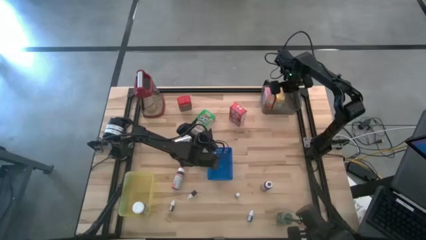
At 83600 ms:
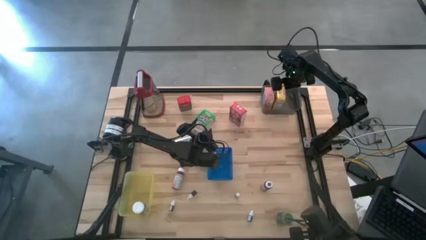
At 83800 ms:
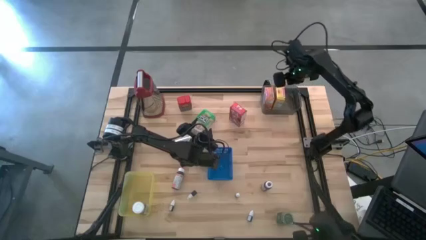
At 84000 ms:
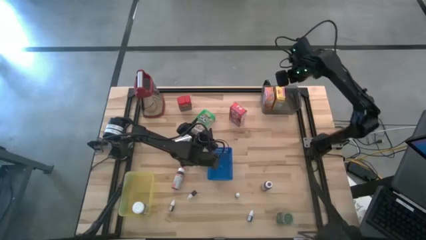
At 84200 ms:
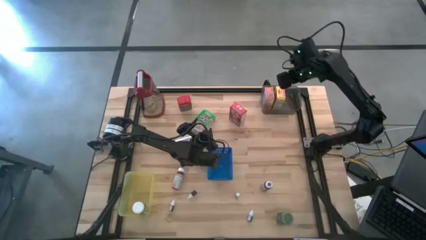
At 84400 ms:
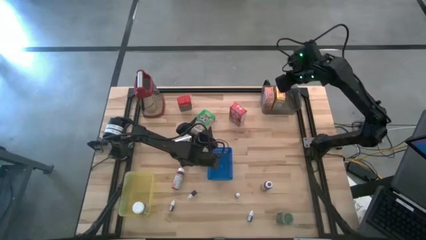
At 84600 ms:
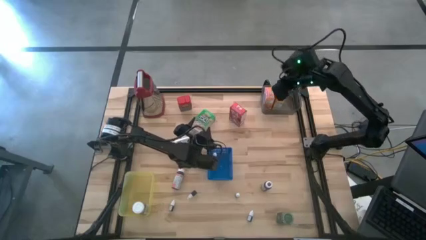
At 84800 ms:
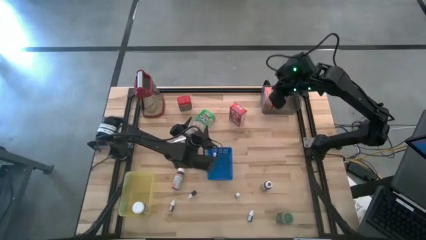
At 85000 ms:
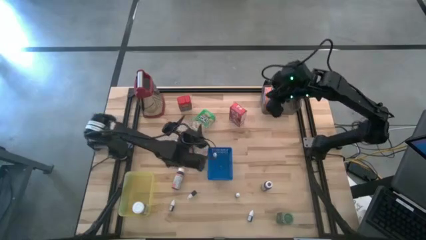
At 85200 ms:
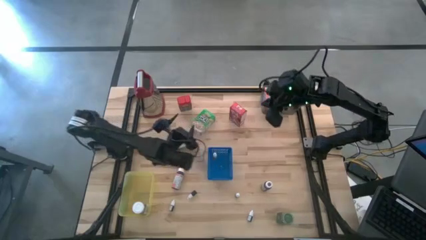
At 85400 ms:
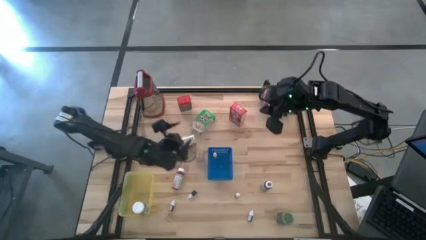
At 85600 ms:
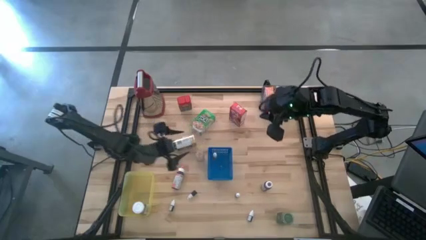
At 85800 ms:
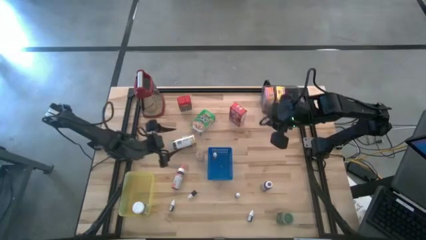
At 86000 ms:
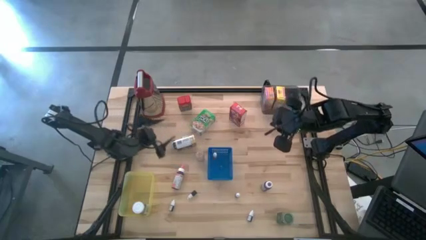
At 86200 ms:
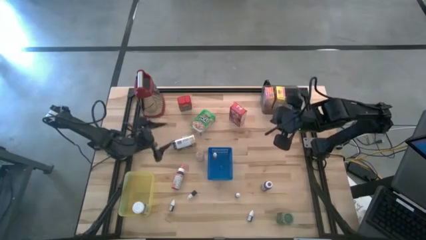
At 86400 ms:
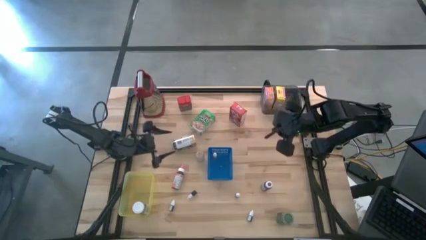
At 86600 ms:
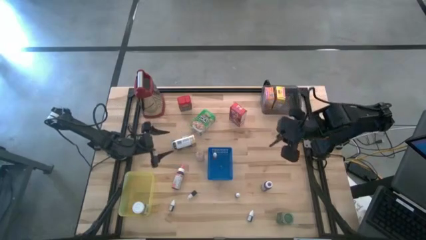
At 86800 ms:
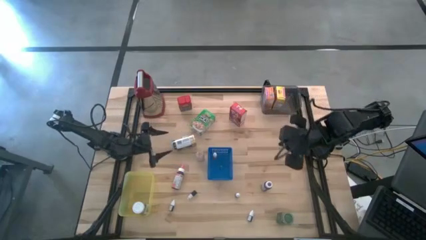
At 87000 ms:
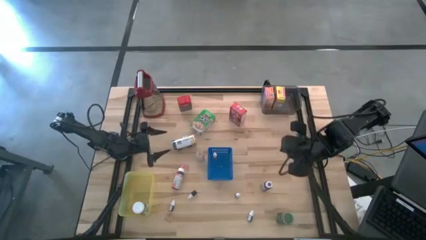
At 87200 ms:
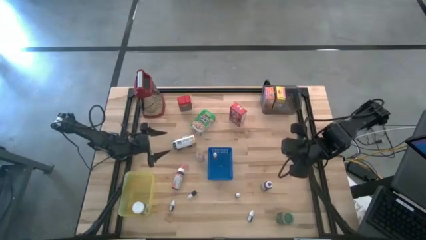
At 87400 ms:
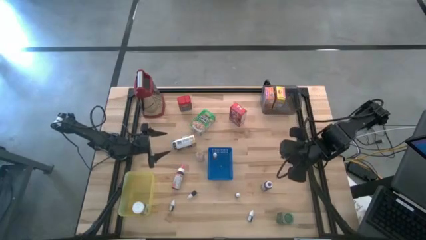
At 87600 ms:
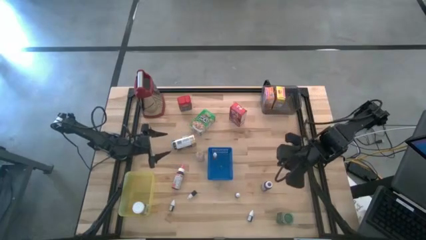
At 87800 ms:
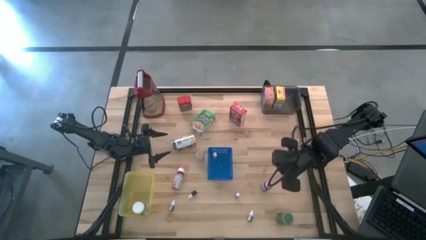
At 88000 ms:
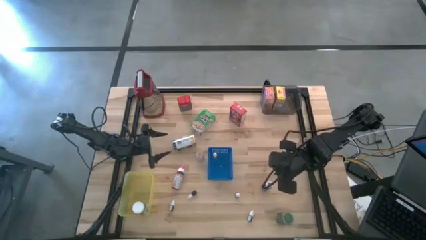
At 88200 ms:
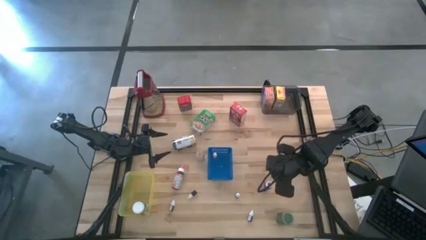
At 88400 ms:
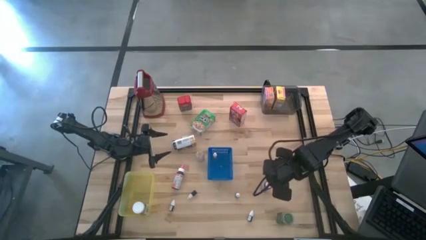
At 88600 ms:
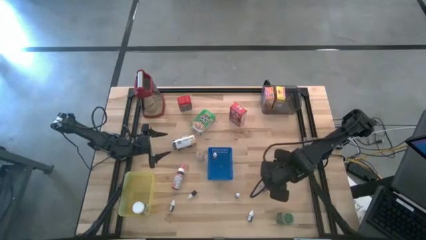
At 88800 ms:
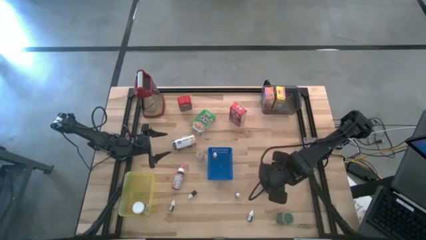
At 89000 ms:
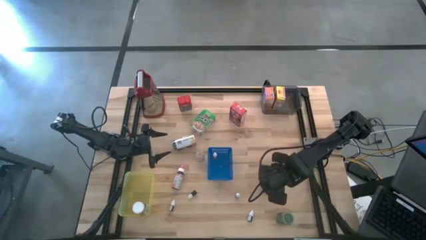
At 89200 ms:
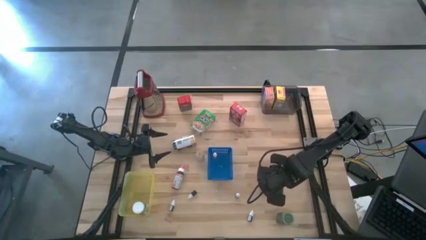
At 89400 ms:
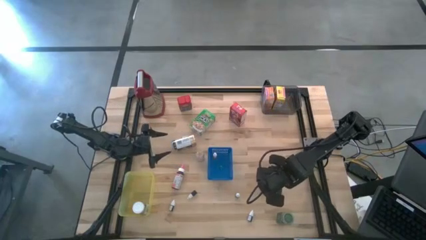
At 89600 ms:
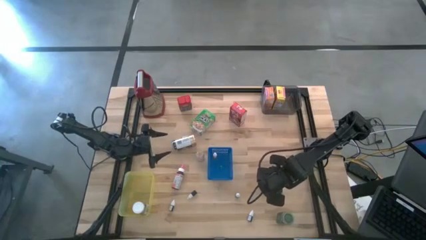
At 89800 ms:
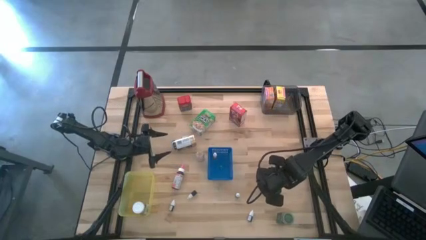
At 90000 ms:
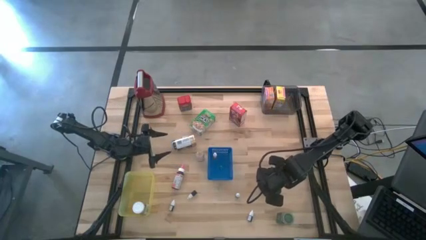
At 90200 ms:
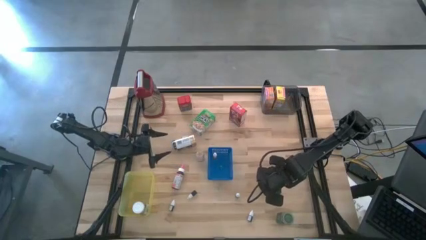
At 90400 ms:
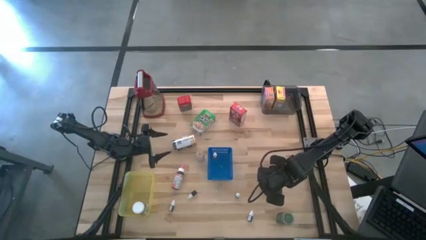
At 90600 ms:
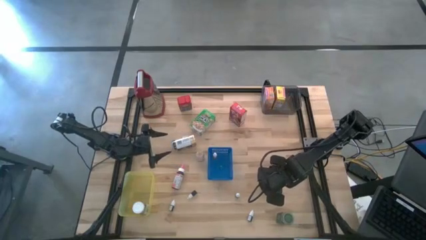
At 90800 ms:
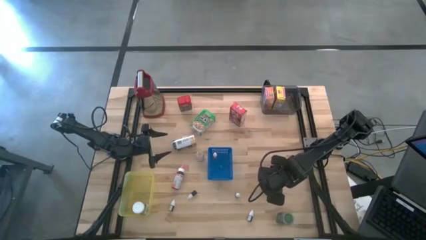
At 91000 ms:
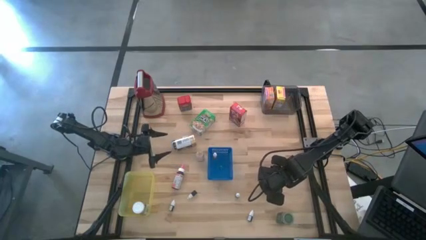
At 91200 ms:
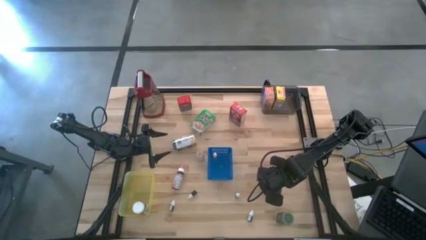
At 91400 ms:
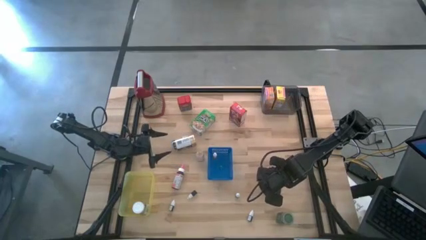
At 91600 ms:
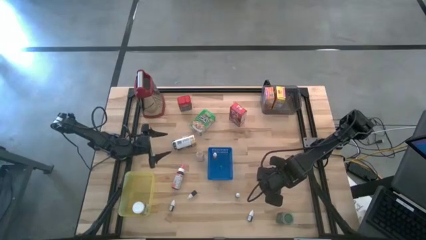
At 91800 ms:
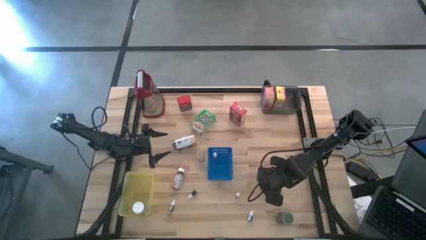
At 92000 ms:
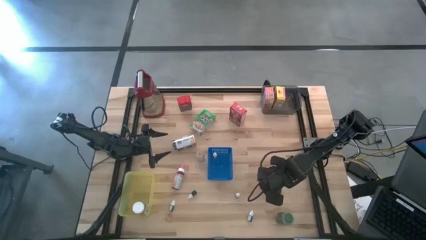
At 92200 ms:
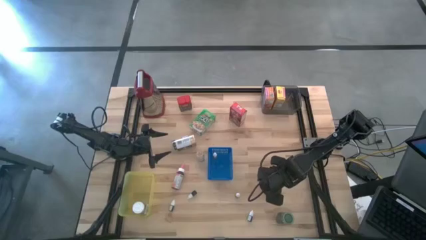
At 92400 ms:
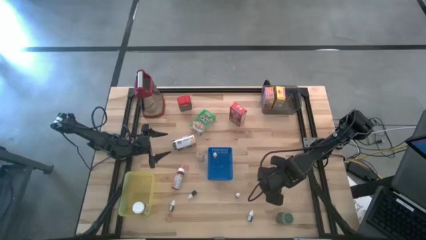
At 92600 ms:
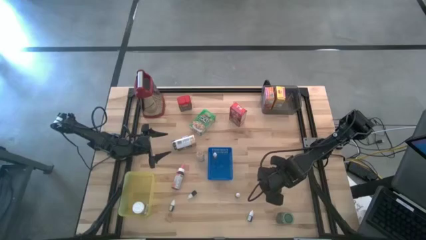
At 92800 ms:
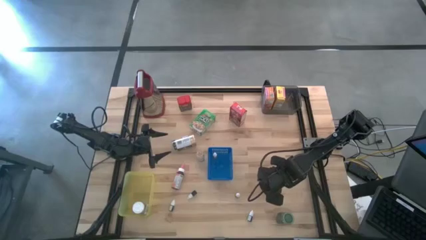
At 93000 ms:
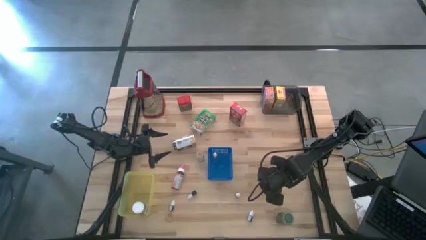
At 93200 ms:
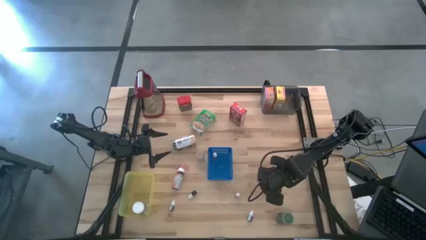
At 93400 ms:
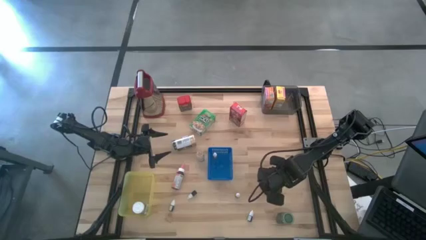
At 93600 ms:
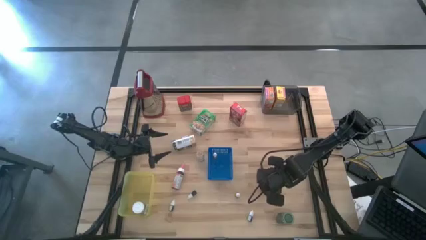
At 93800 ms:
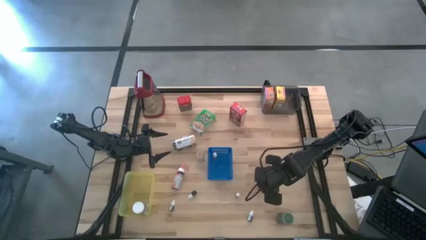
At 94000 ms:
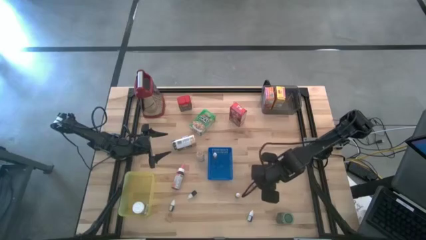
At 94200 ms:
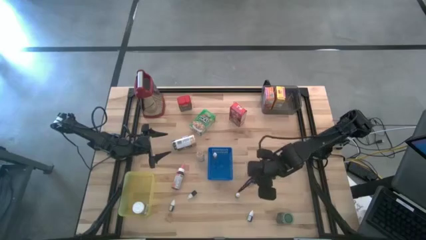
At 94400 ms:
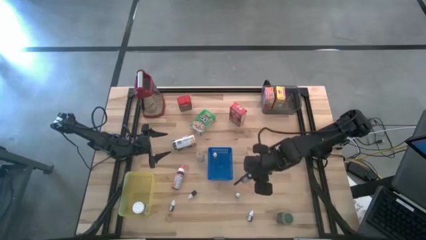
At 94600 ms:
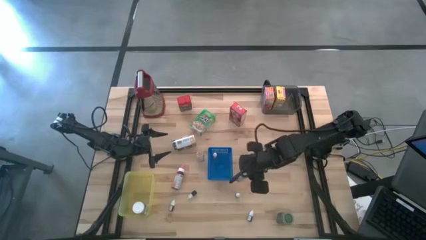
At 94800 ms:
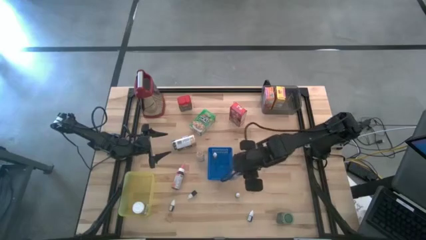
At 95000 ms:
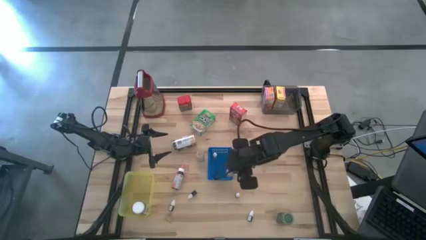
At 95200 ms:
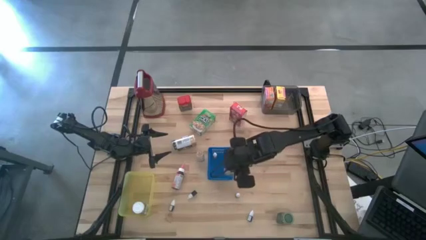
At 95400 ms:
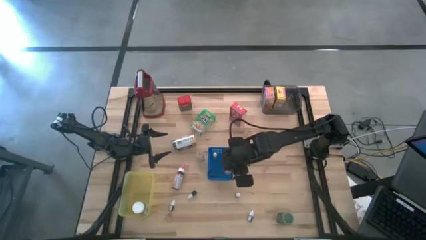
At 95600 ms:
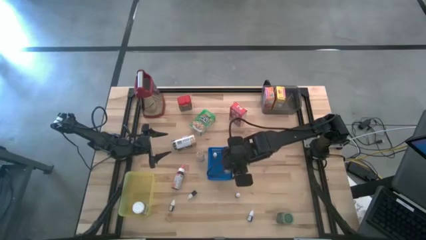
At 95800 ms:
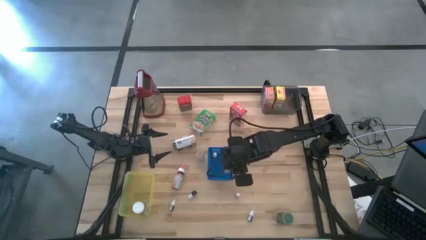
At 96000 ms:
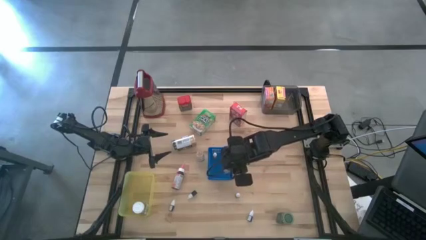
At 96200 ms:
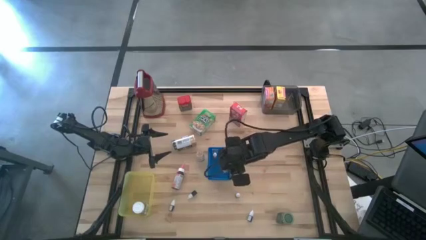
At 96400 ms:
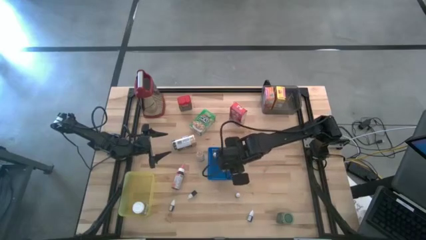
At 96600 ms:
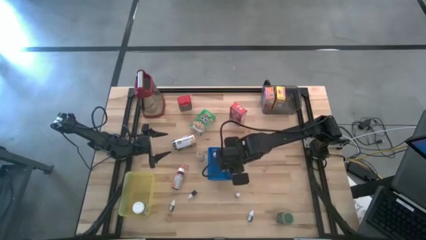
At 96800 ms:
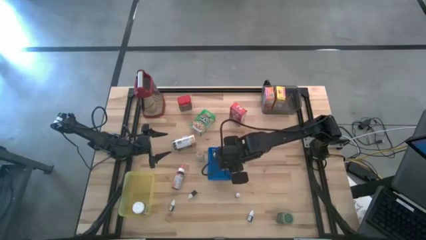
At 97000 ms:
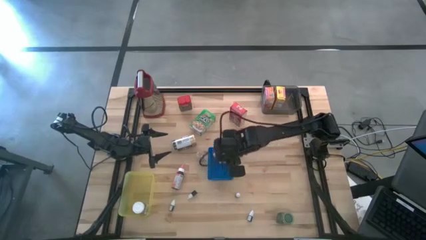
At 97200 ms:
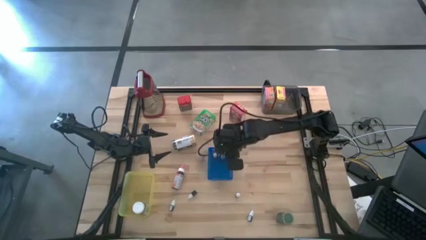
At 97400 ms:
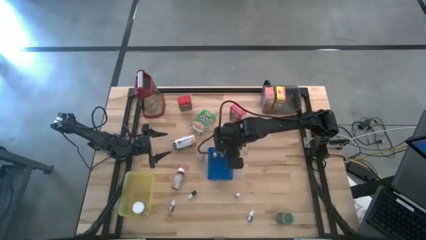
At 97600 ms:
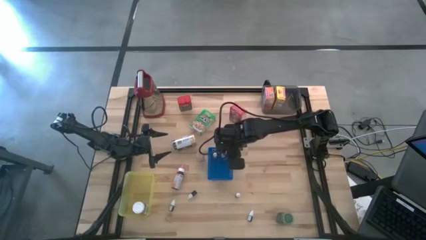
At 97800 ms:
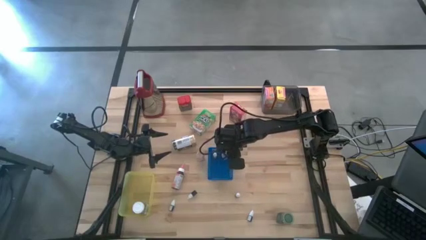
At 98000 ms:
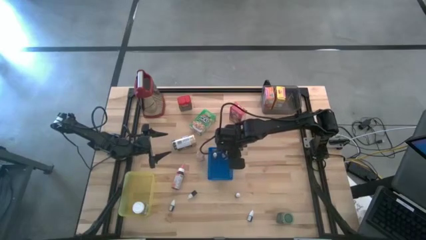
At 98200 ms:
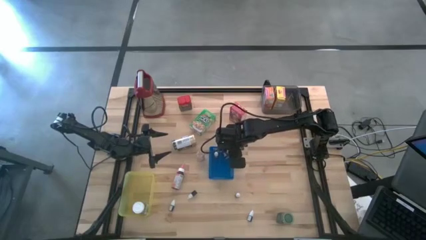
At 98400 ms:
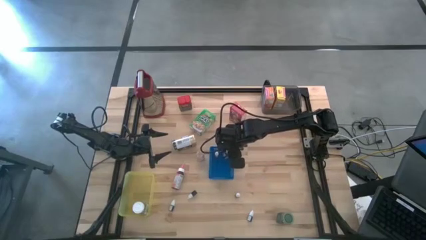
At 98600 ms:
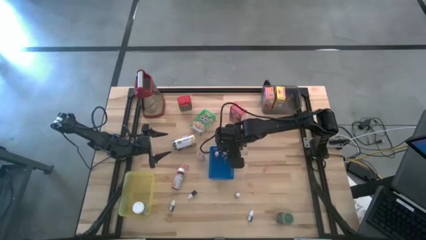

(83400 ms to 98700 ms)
Task: Pick & Place Kitchen Items
Put the large purple food coloring bottle into the blue bin
